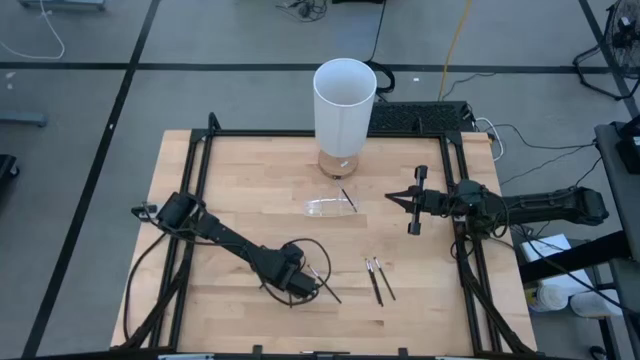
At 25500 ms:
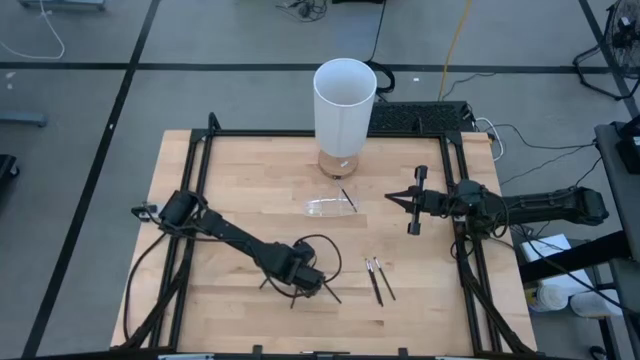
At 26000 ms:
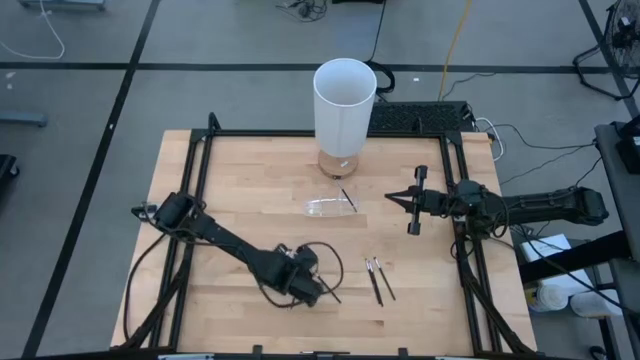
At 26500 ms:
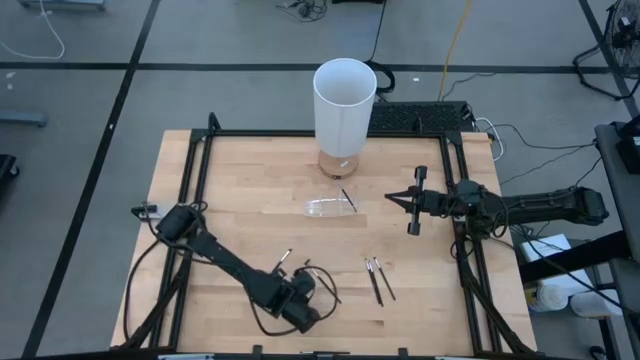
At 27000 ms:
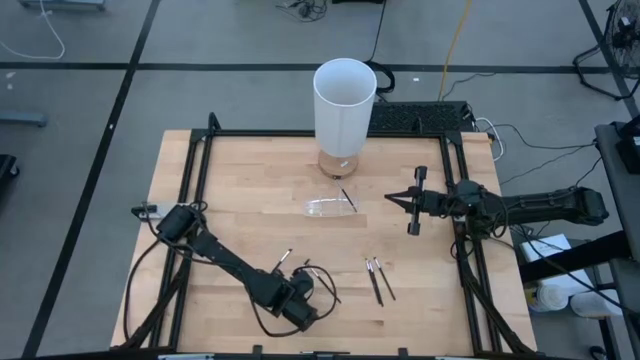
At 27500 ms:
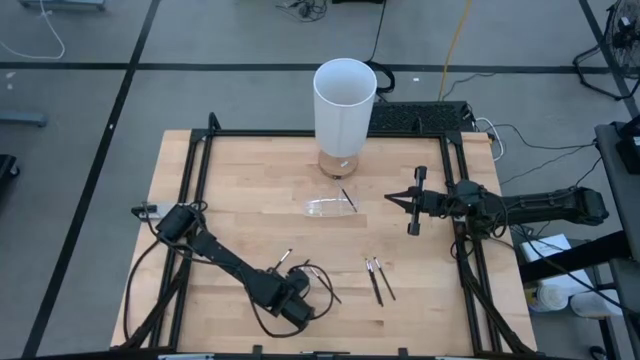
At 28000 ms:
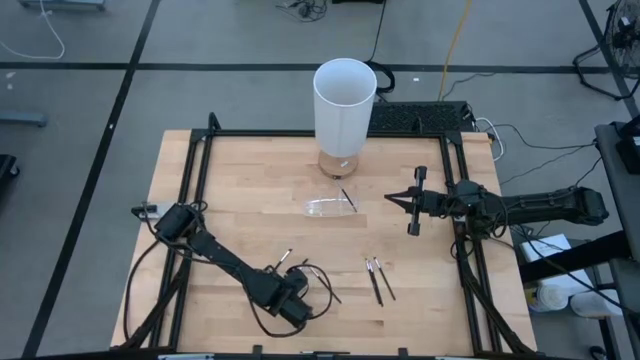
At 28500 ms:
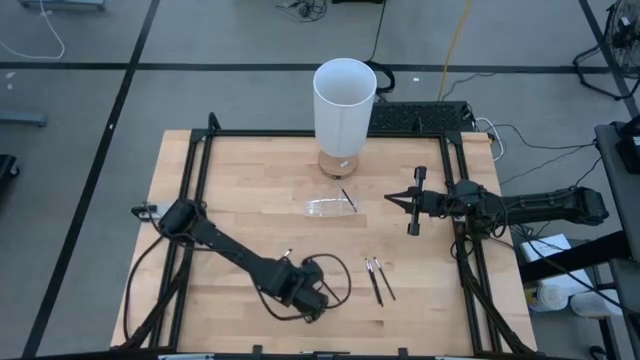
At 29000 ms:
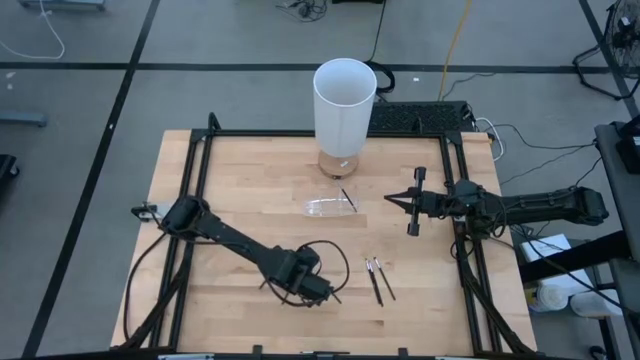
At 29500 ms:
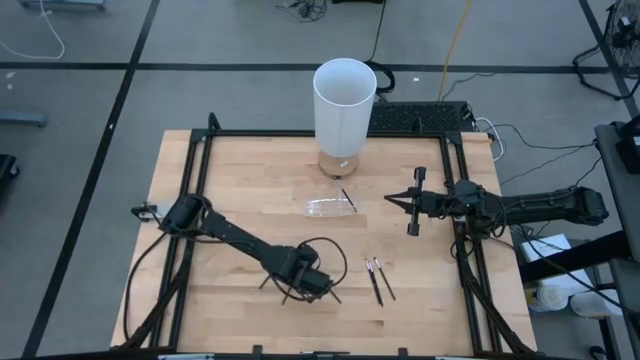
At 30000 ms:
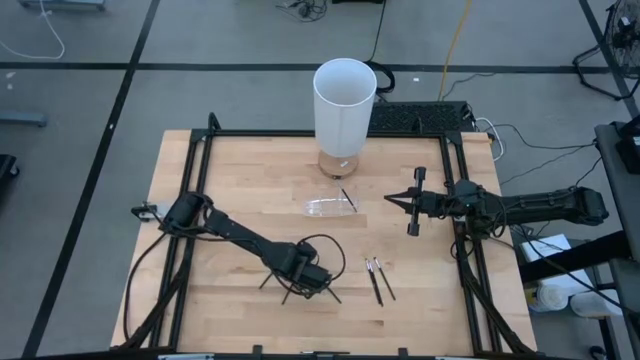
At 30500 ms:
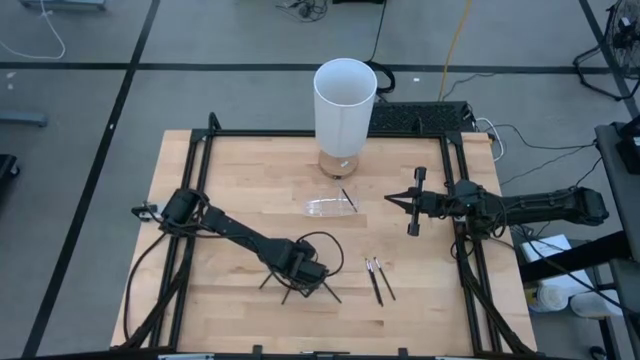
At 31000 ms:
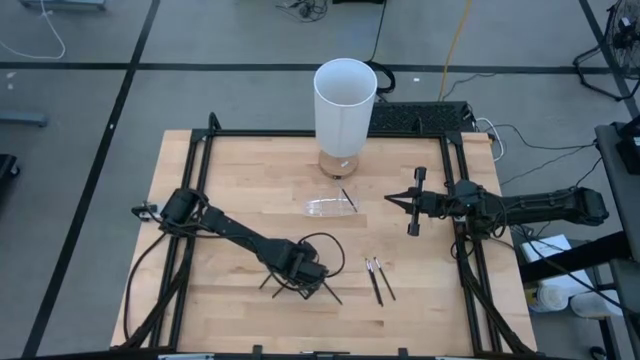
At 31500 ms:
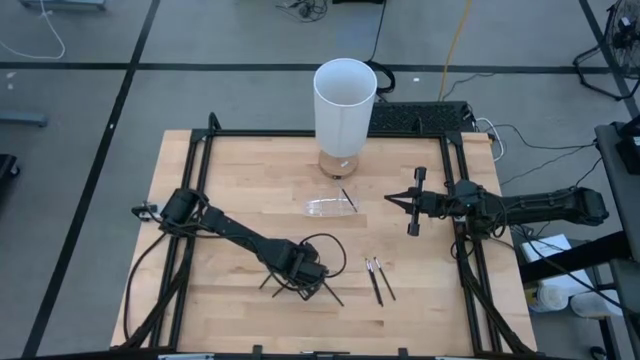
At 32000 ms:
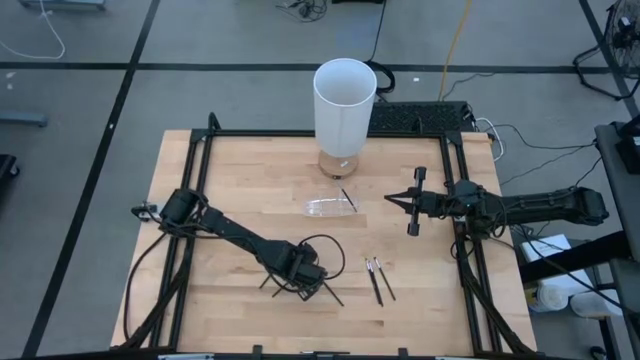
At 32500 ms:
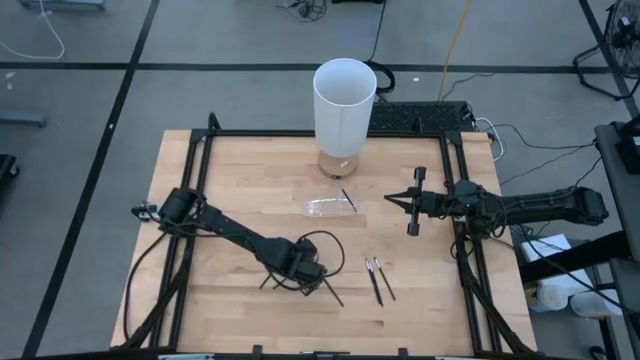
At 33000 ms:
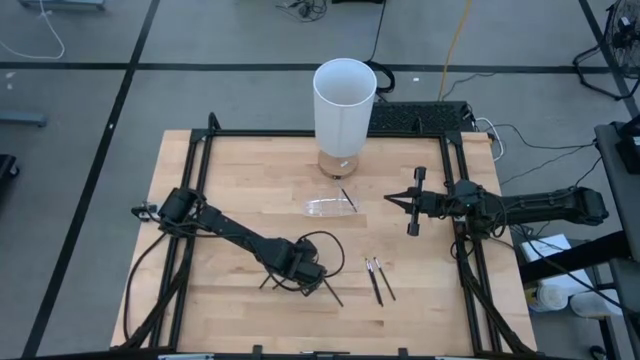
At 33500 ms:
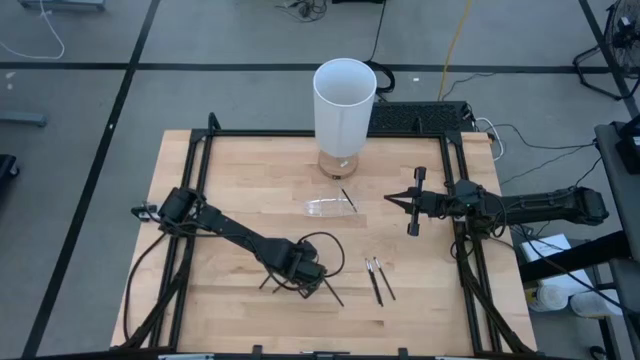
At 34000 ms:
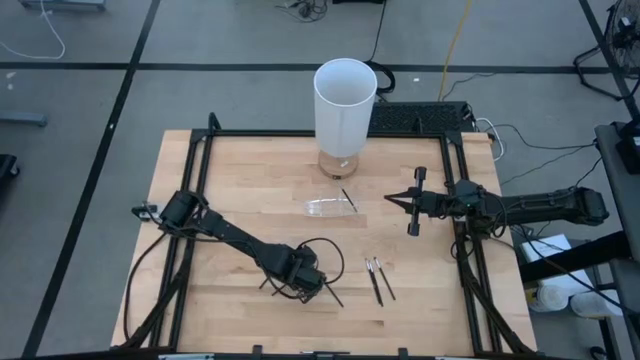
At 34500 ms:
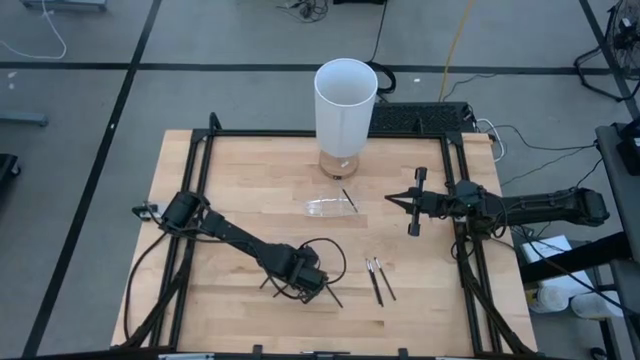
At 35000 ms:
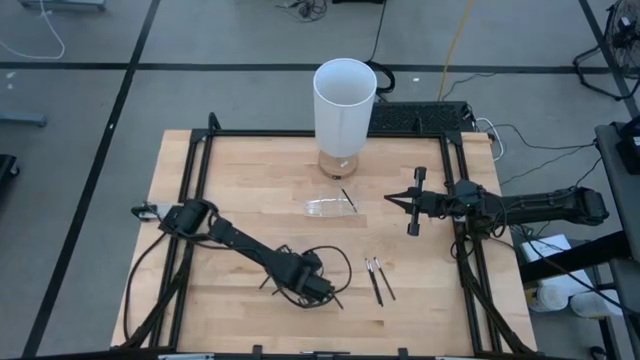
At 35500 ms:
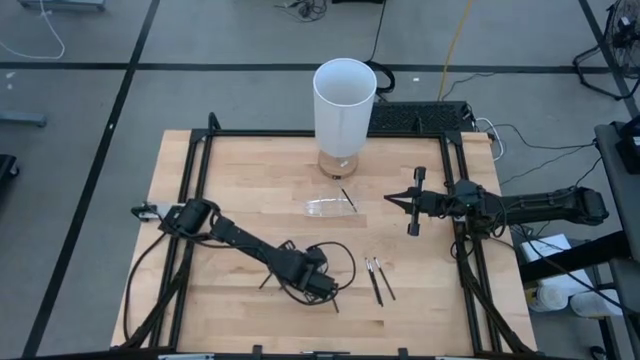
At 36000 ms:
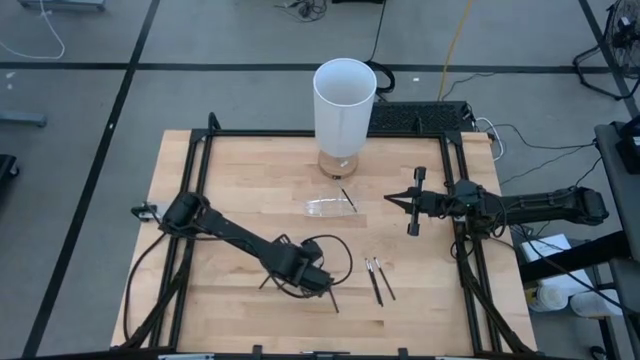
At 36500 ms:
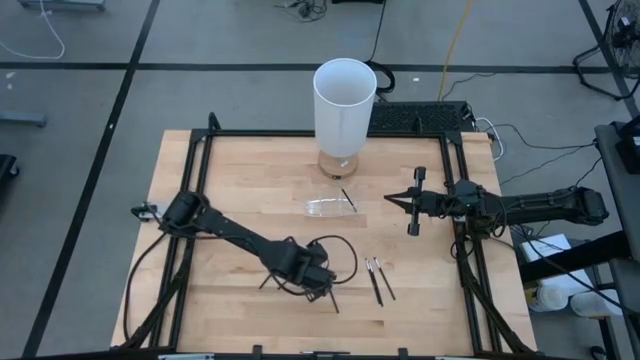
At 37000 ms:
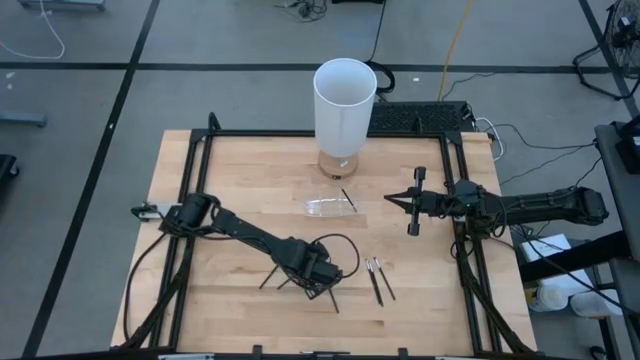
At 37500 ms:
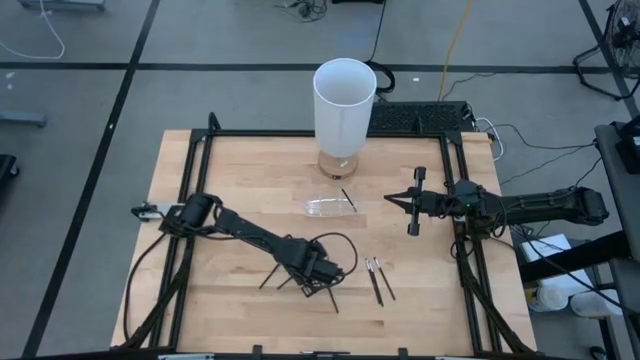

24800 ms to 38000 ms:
Task: Put items in baskets/containers
Put the brow brush into the transparent organizer

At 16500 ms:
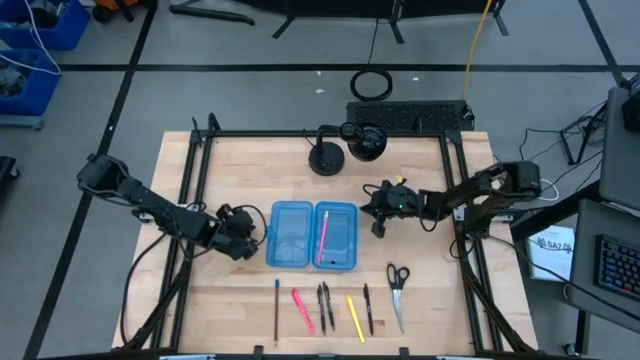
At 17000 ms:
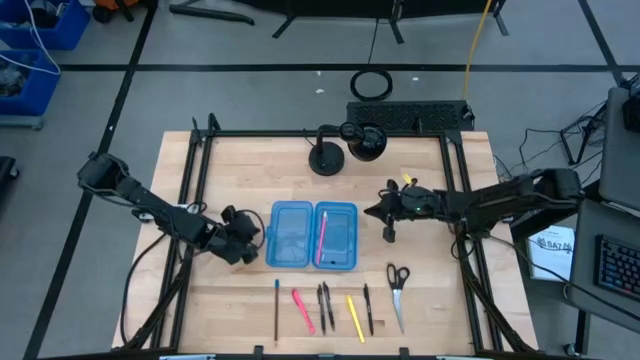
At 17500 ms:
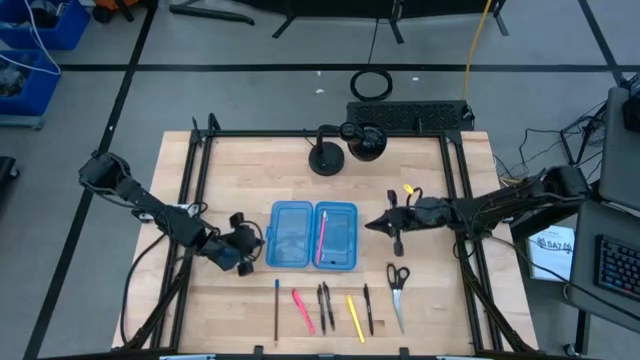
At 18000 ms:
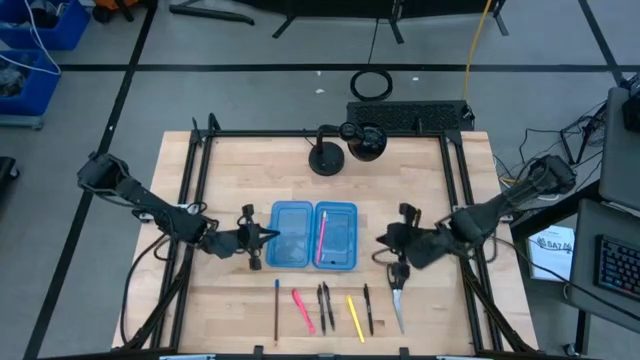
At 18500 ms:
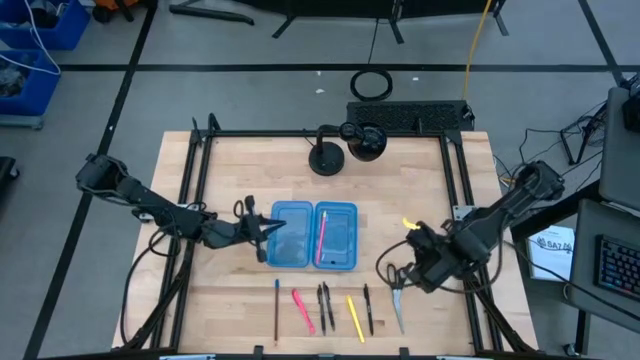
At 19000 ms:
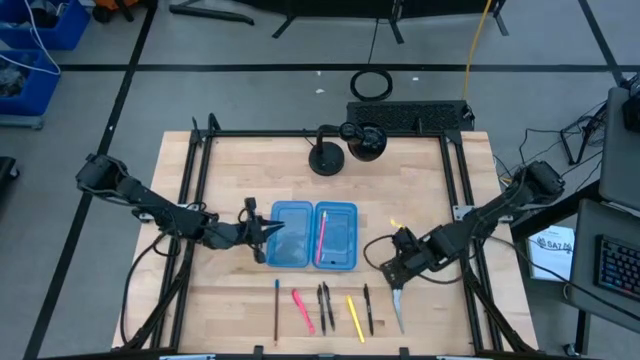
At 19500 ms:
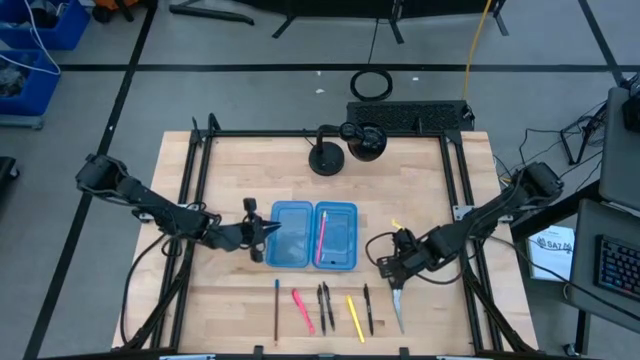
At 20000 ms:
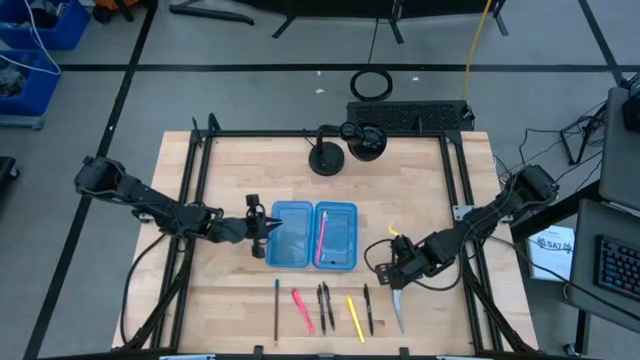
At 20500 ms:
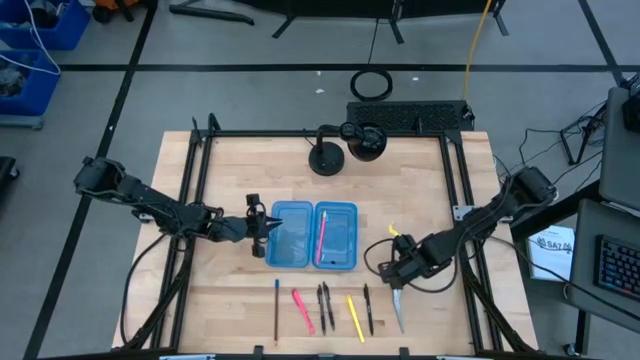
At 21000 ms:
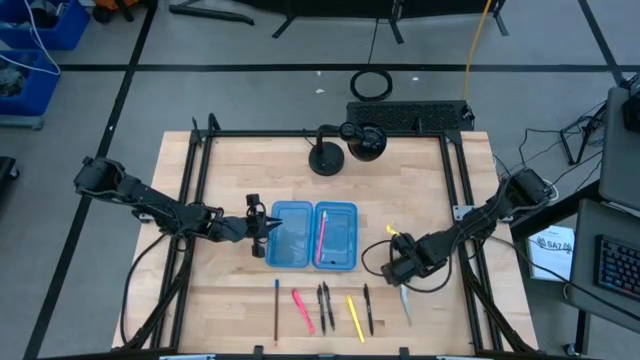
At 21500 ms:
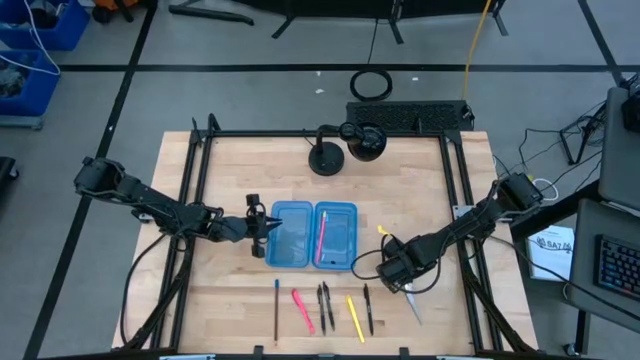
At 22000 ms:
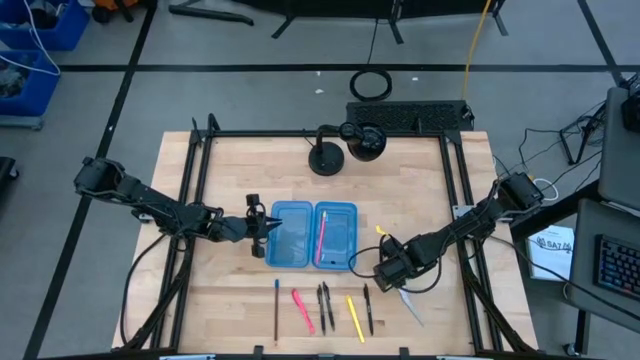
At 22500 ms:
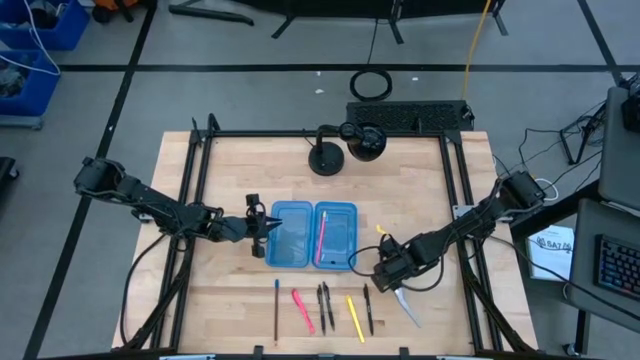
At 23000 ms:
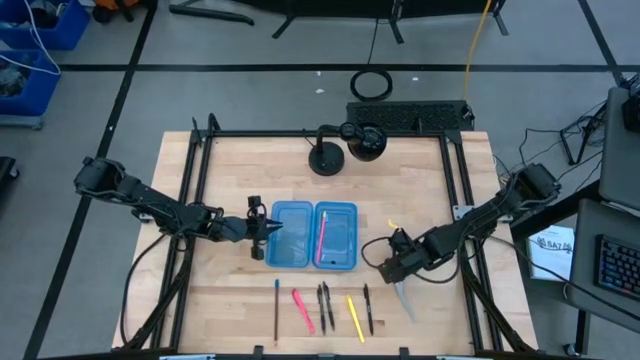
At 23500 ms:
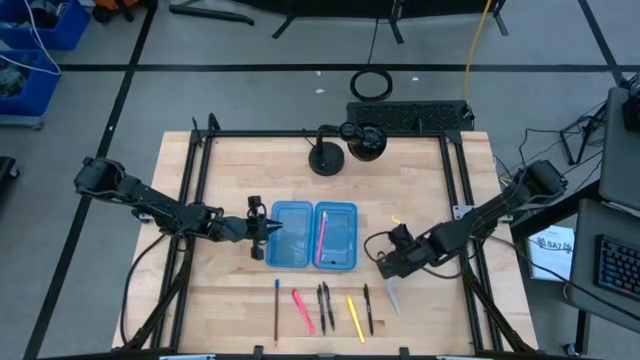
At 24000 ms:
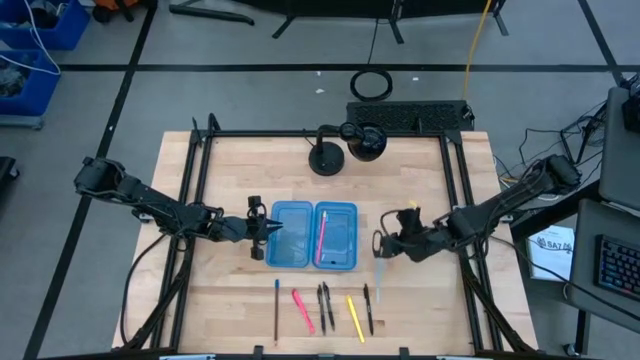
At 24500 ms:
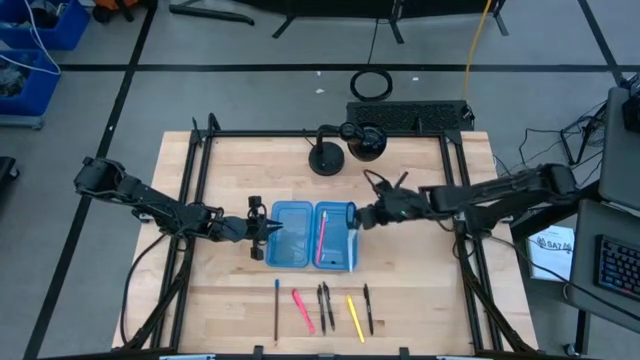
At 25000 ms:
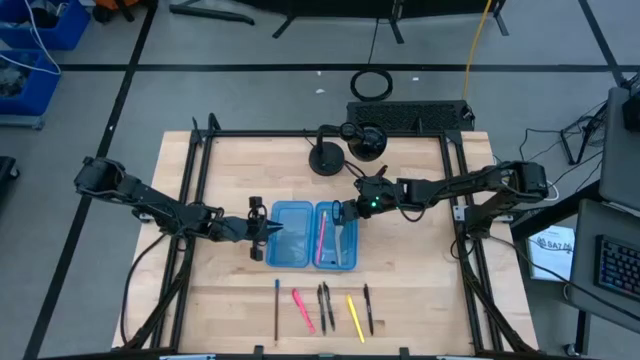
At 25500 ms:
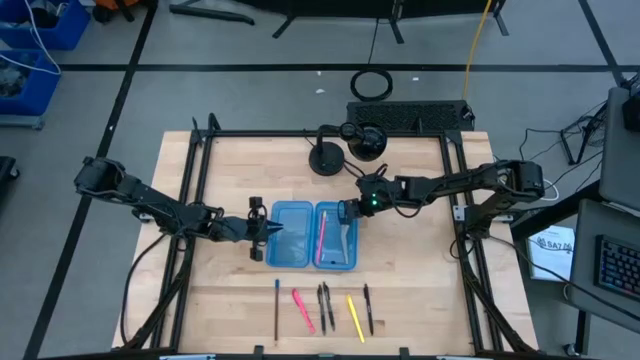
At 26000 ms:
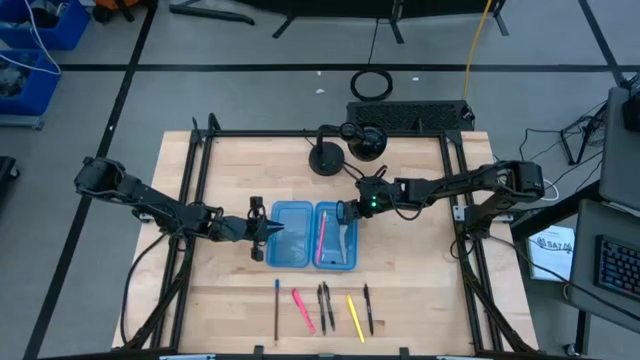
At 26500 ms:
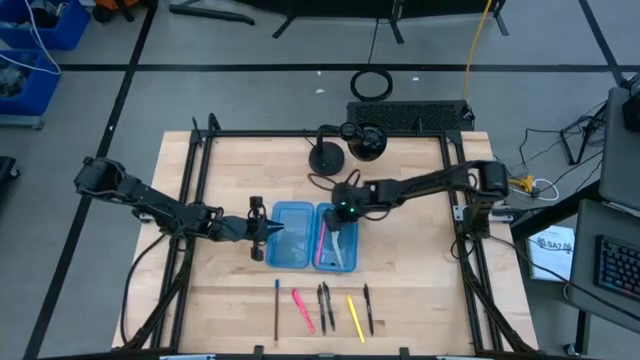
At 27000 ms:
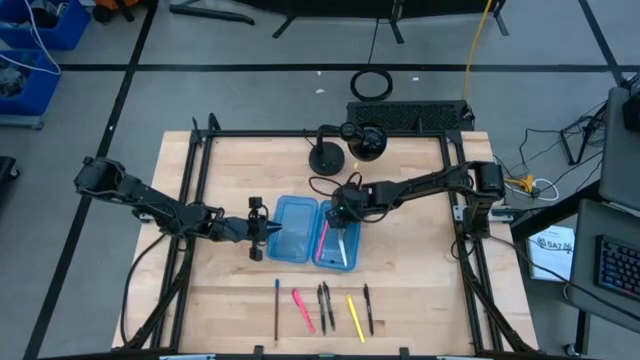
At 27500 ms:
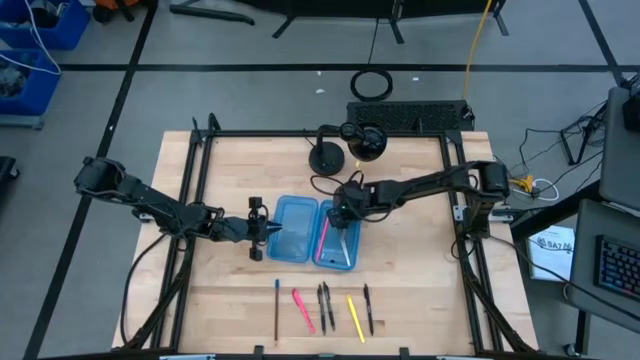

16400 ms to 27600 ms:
Task: Pick & place school supplies into a supply box
Put the black scissors into the blue supply box
